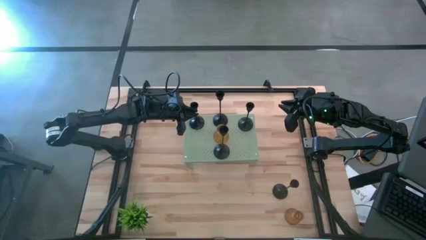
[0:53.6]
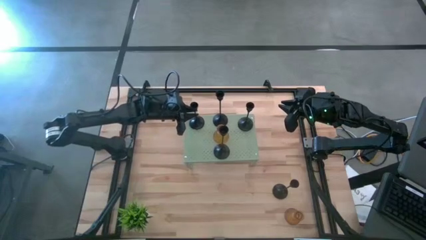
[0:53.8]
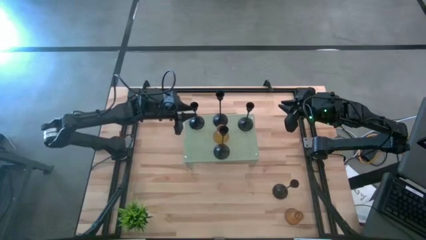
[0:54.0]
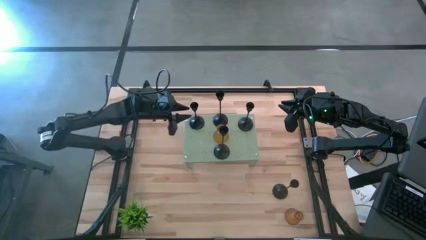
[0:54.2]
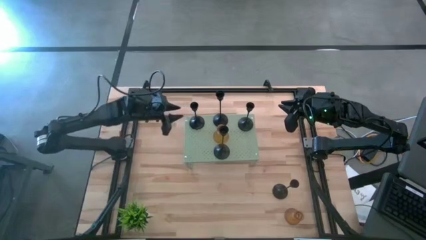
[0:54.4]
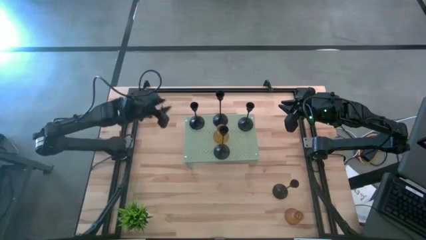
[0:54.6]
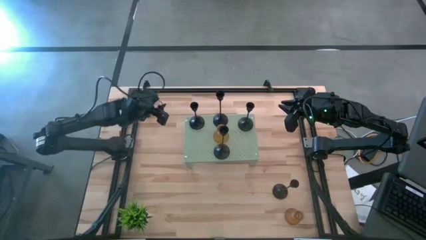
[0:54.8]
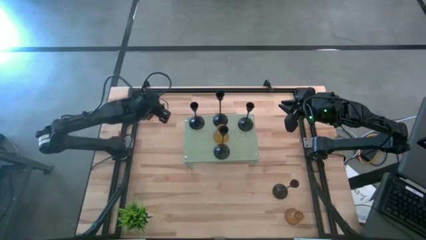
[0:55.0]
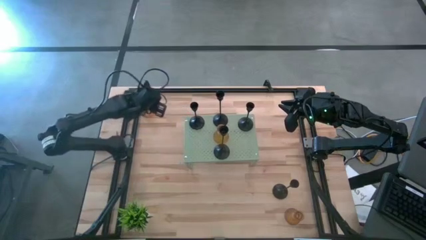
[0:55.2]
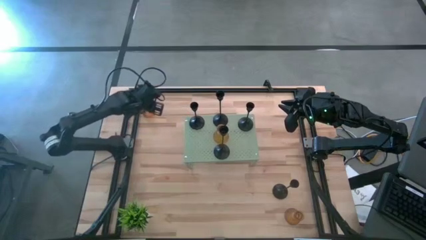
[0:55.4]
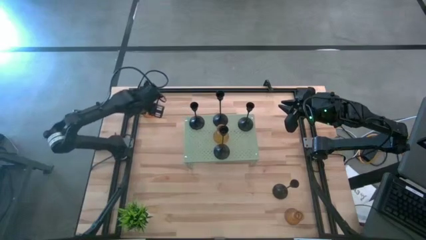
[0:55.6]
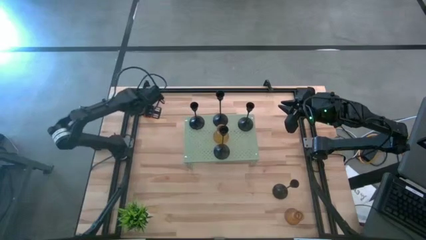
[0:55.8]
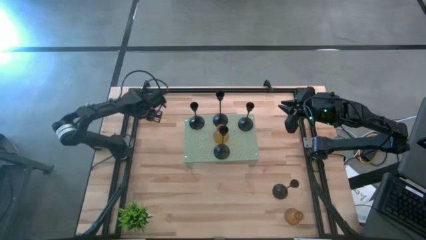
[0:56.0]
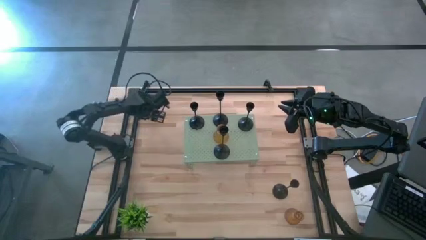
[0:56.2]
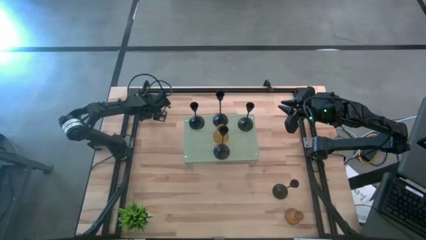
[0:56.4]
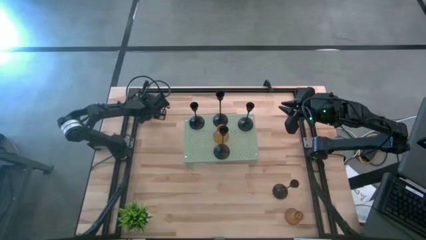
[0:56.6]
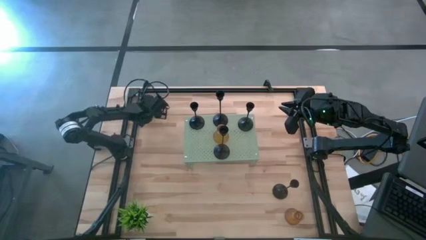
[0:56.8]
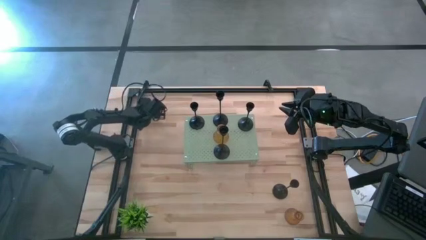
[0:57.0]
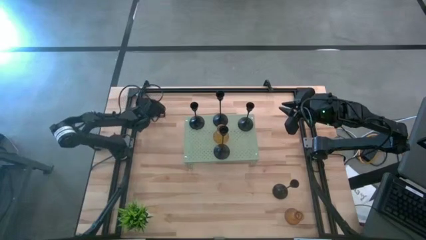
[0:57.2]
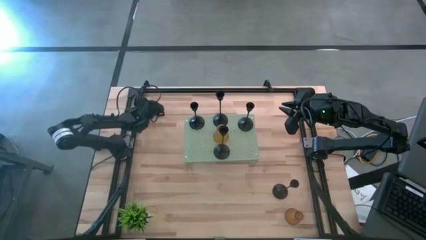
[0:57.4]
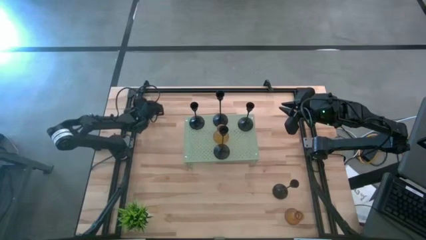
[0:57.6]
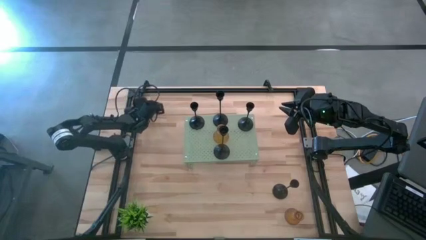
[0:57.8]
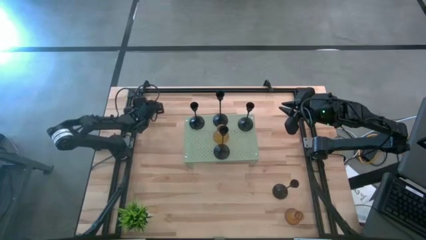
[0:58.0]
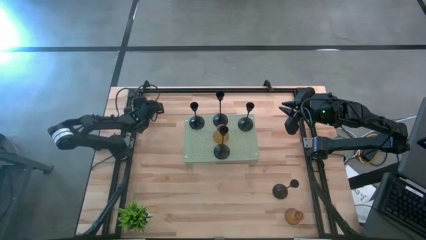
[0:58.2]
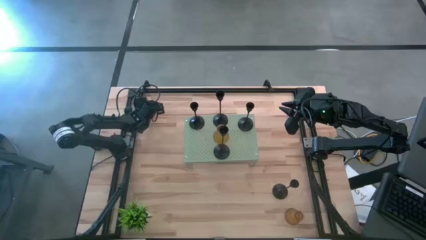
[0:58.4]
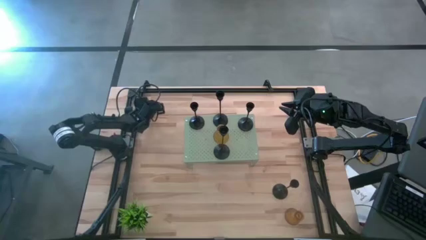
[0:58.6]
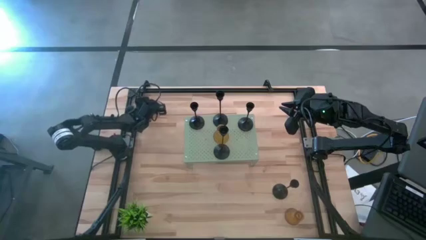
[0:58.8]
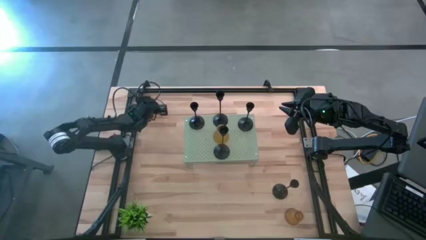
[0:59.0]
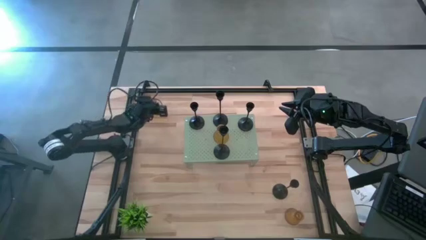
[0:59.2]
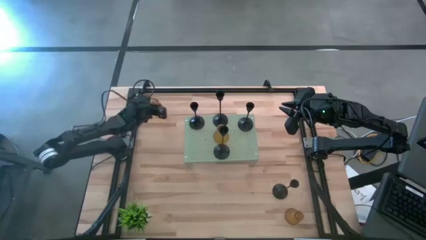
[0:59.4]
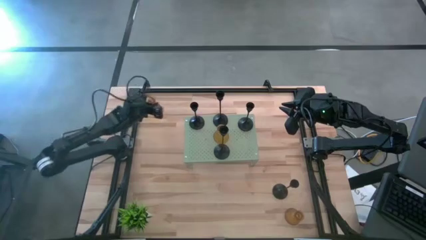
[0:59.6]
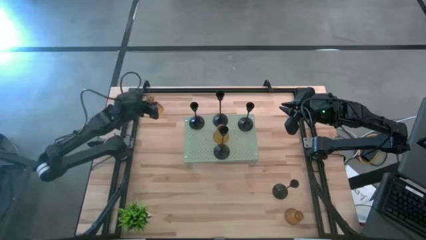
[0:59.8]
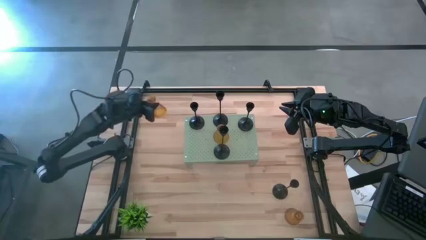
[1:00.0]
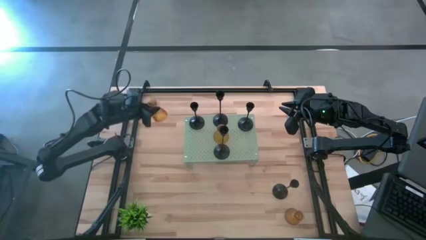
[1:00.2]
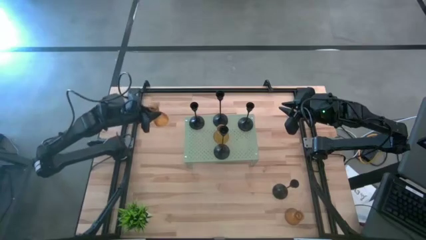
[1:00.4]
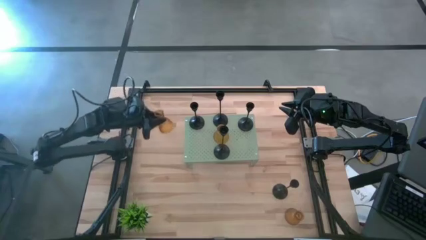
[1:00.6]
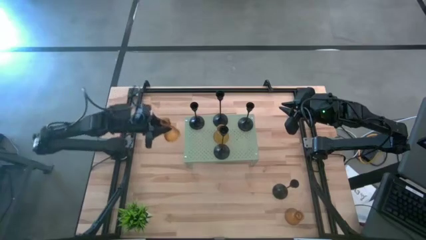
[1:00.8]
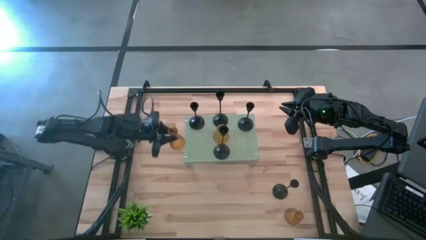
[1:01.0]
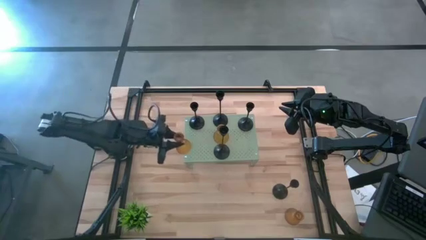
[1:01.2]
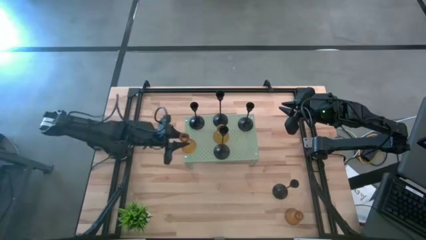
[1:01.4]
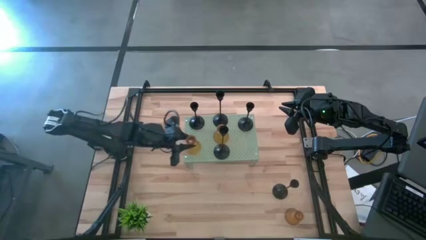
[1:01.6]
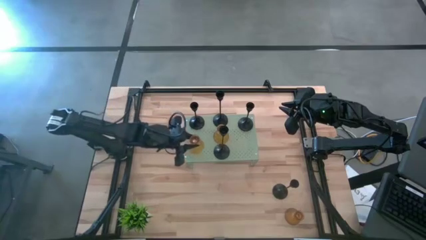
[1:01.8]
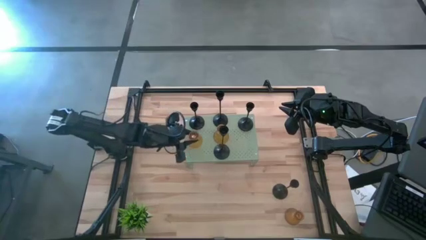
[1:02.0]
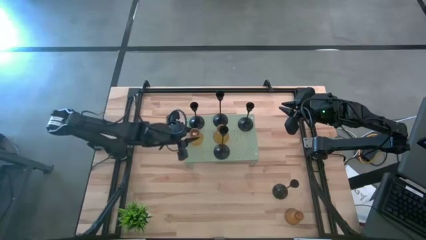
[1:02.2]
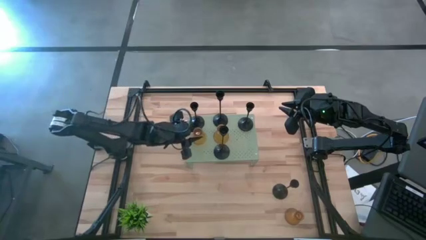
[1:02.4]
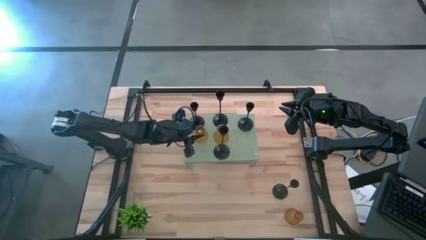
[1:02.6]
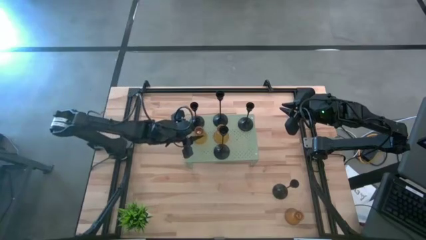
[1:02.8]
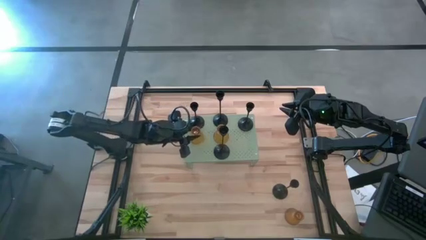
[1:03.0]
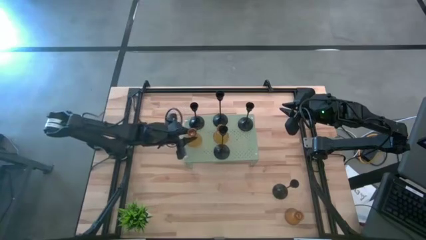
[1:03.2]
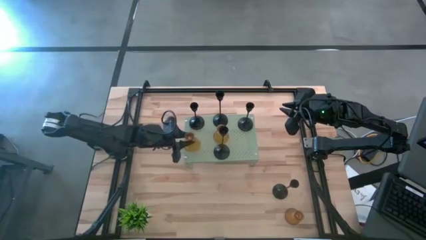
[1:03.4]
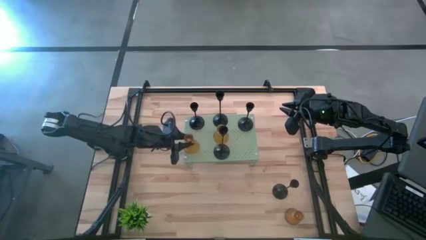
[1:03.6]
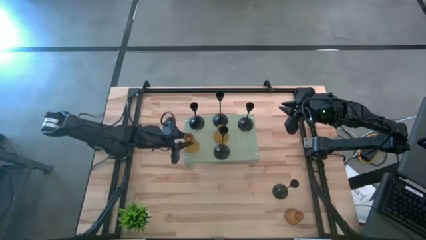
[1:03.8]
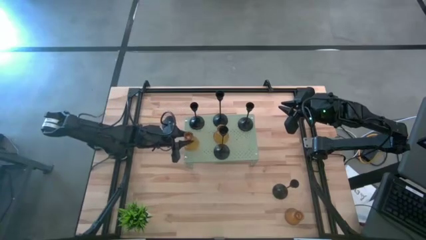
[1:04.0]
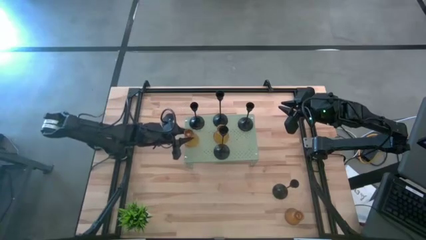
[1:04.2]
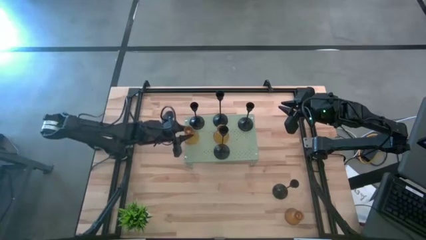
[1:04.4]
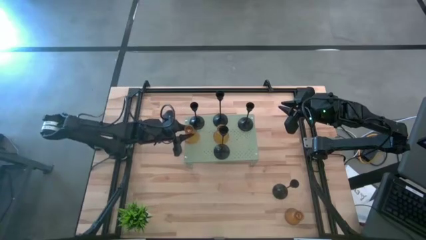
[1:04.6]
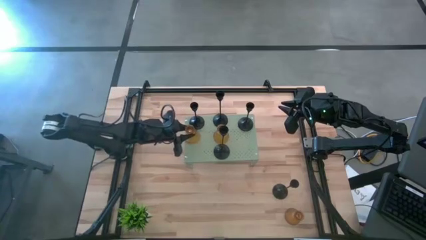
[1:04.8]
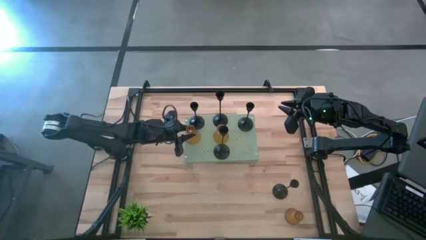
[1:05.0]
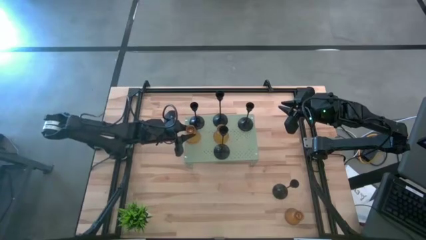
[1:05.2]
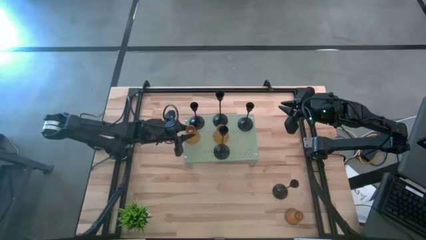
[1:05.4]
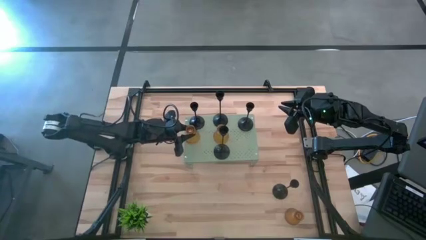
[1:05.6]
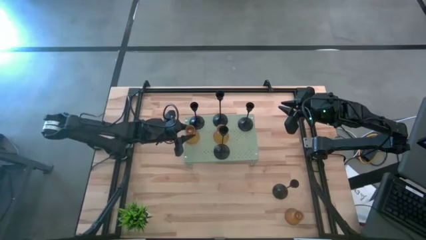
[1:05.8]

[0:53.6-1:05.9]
Task: Pick & Place candle stick holders
Align the top left yellow glass candle holder with the black candle holder on the shelf
